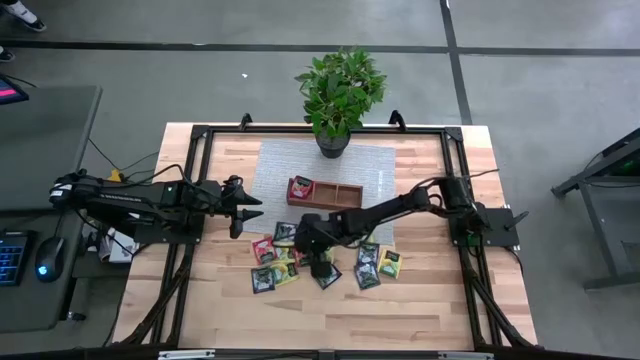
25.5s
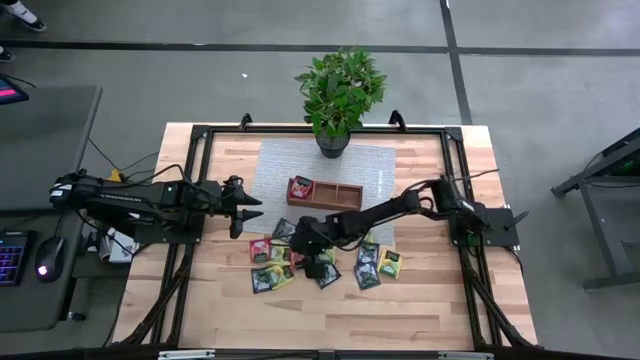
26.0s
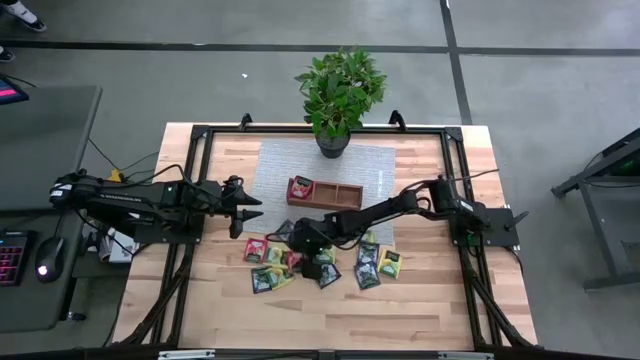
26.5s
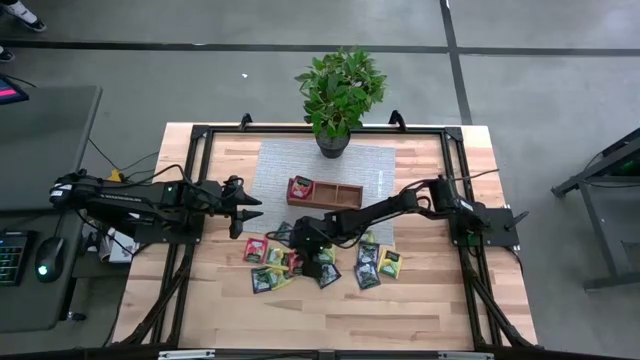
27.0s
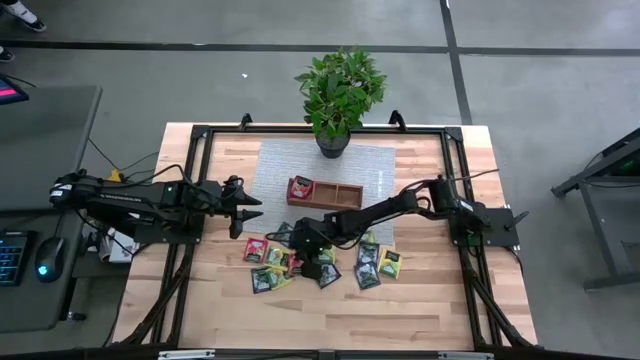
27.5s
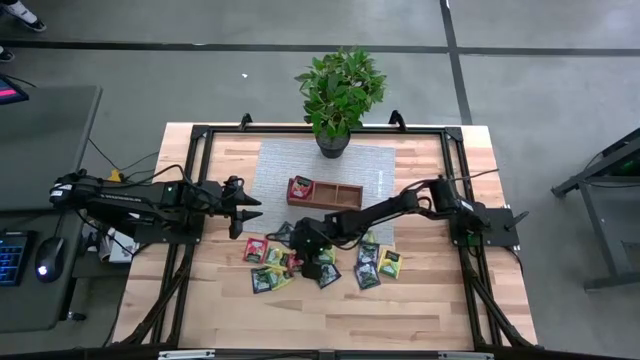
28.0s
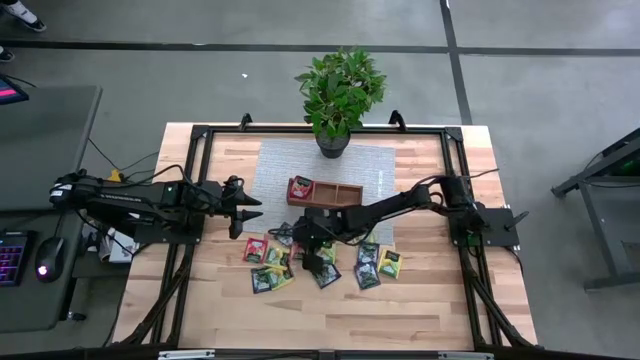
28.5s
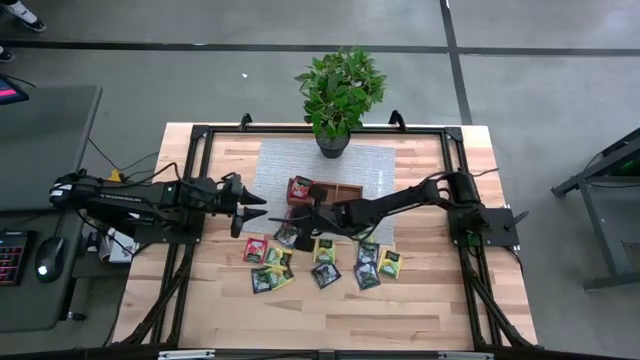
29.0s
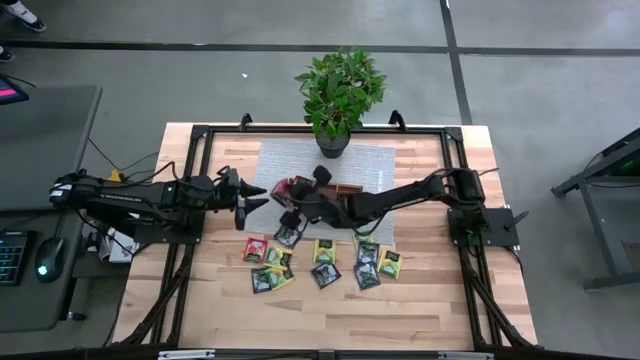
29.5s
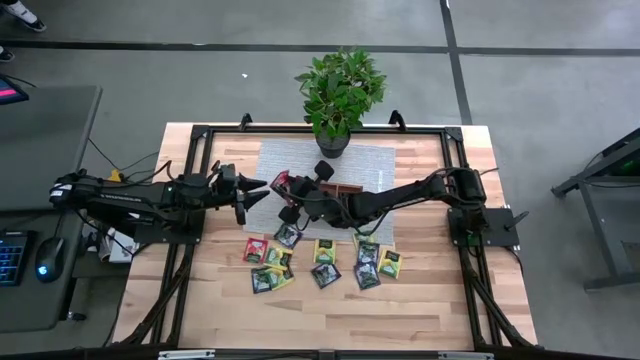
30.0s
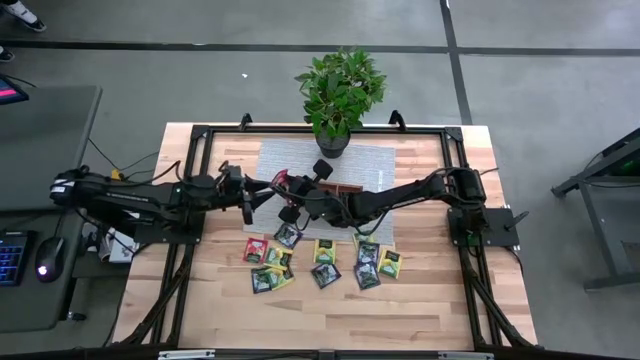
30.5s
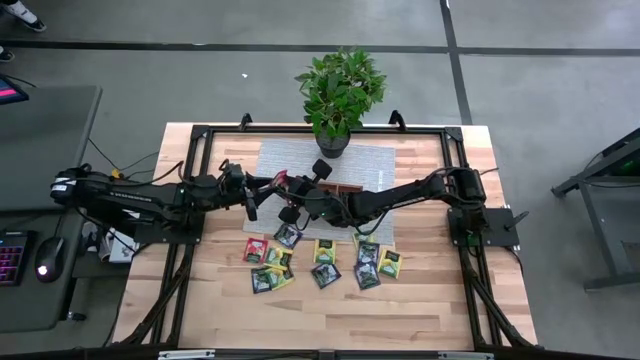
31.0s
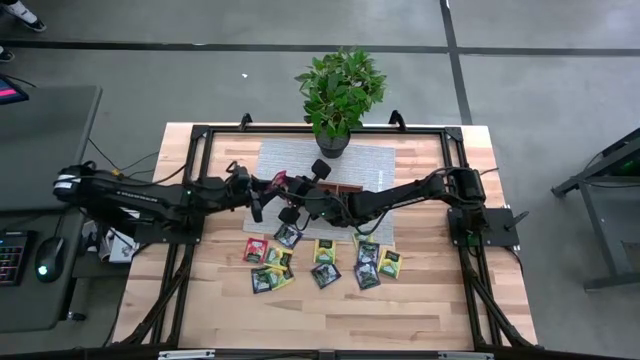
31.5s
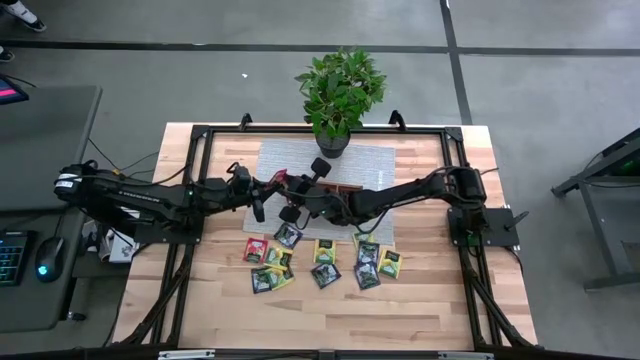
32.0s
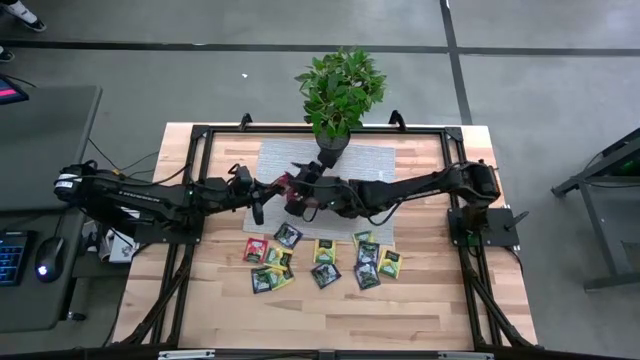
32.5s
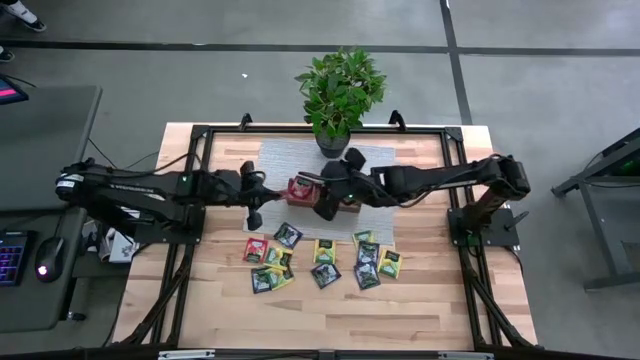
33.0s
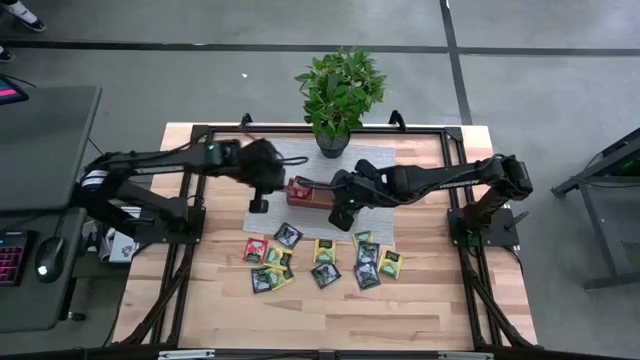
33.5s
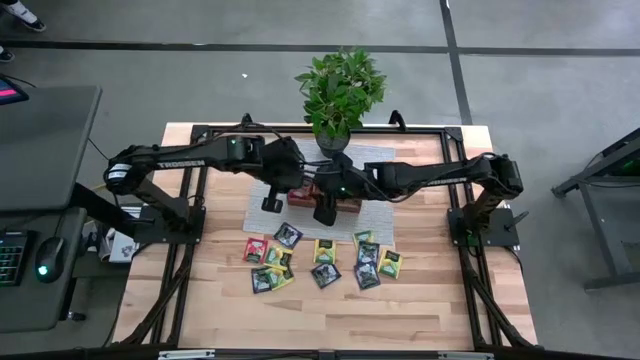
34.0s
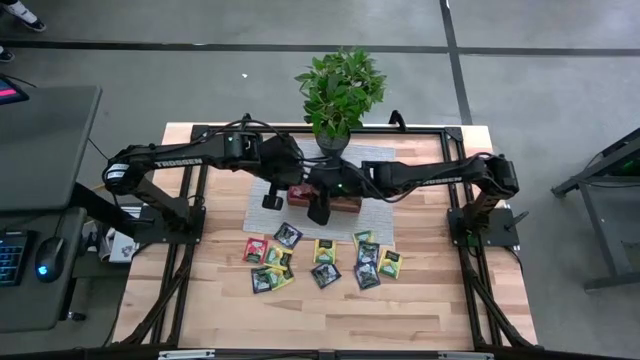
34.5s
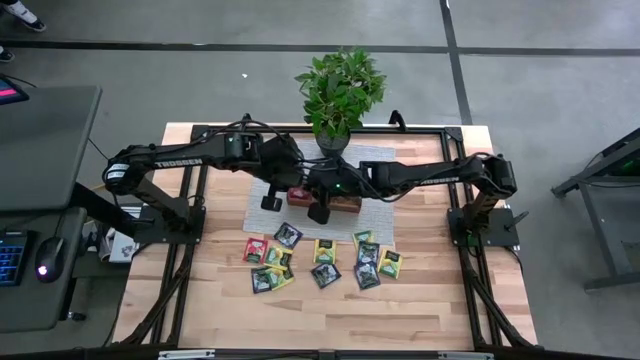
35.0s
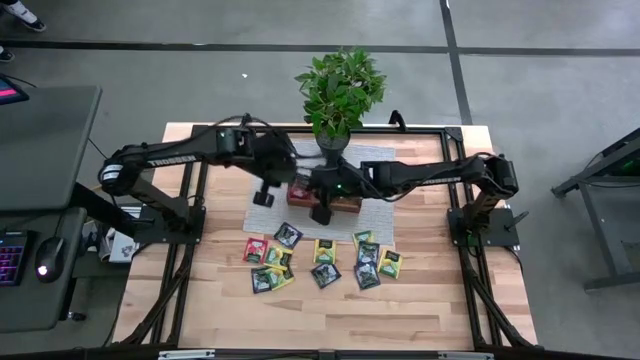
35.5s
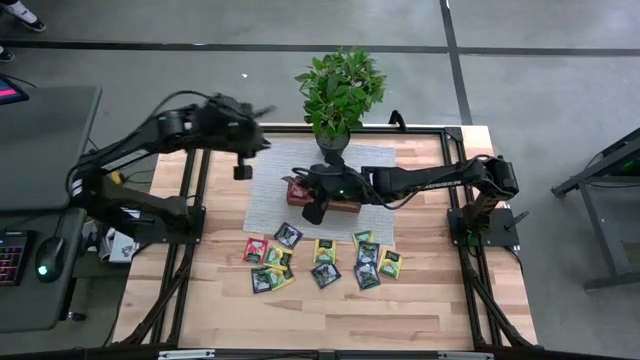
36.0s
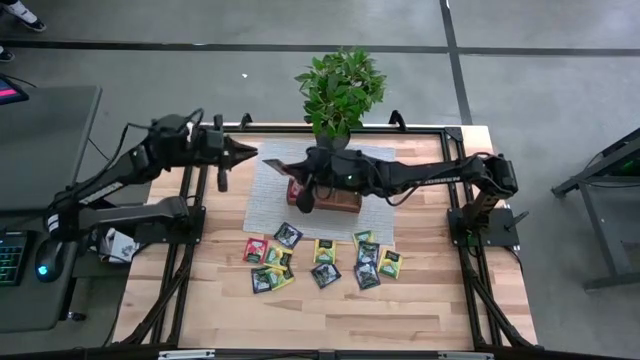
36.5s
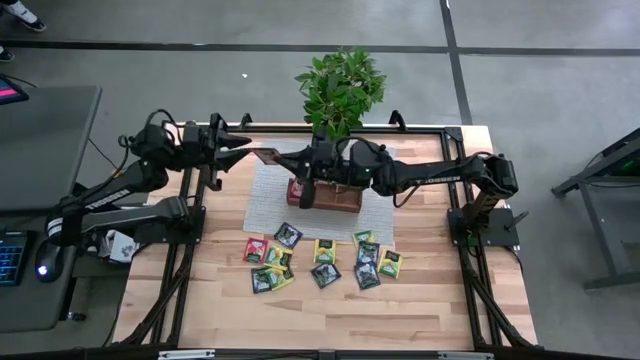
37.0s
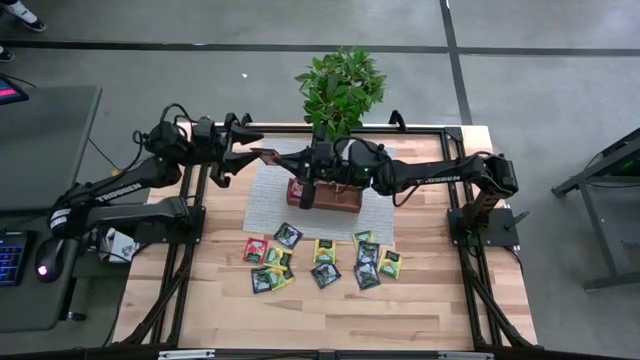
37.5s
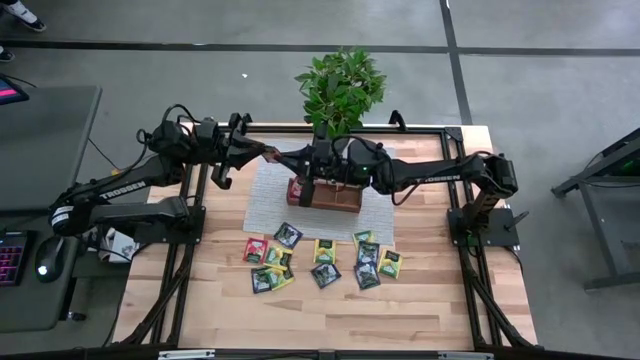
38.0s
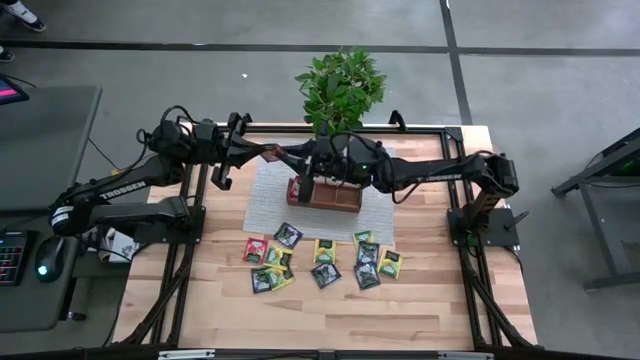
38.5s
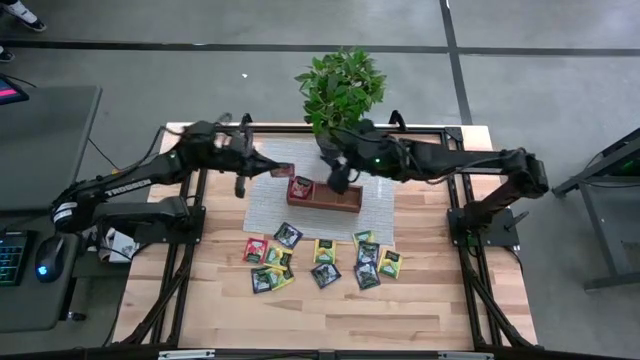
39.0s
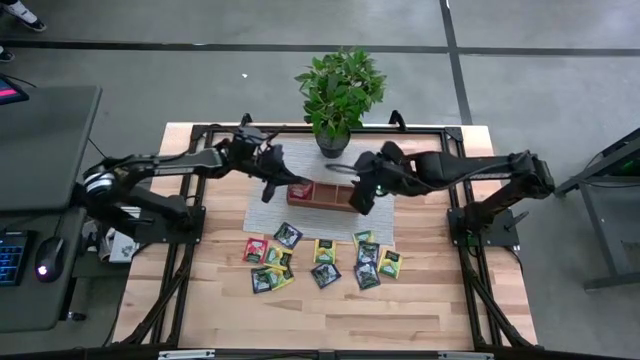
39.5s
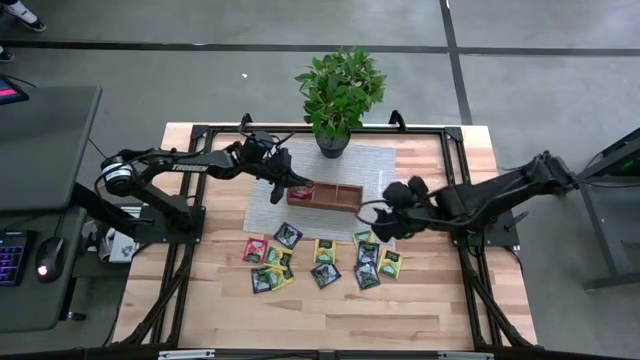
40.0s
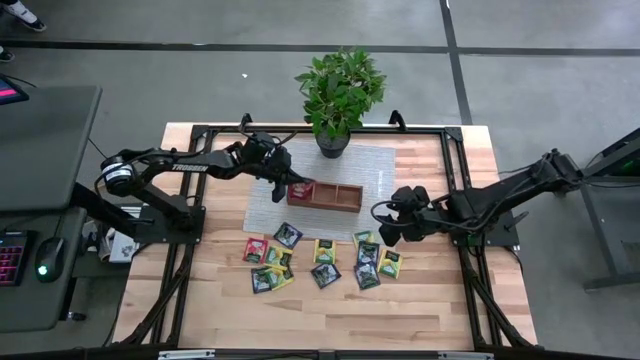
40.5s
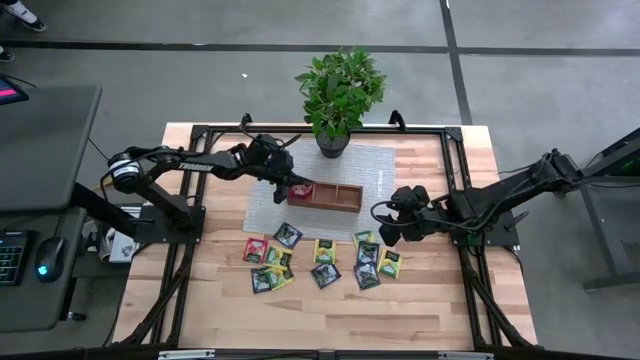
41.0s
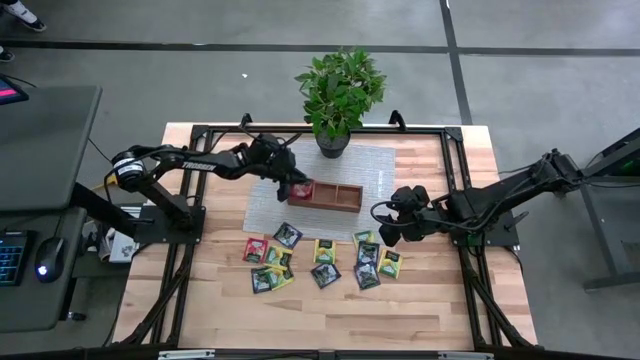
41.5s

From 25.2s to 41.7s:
Task: Pick & Place Tea
Put the red tea bag into the left section of the wooden organizer

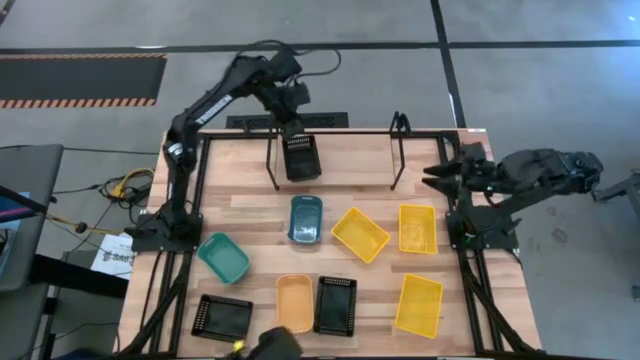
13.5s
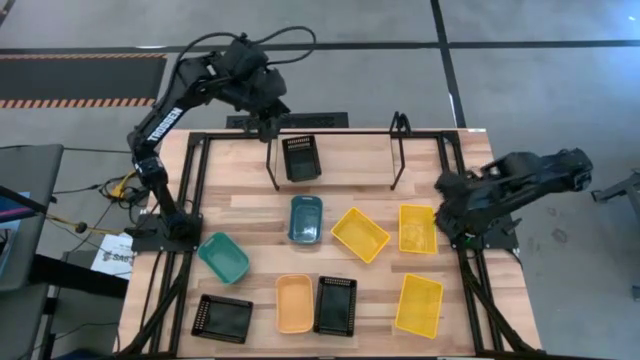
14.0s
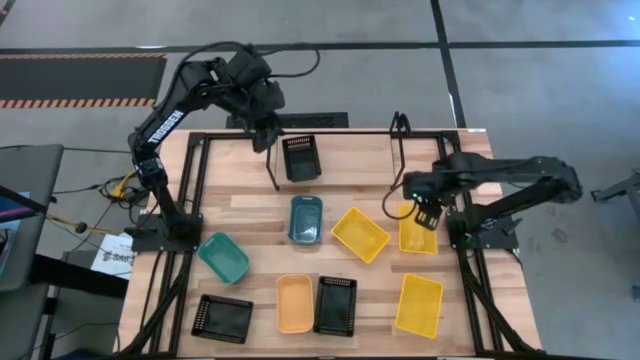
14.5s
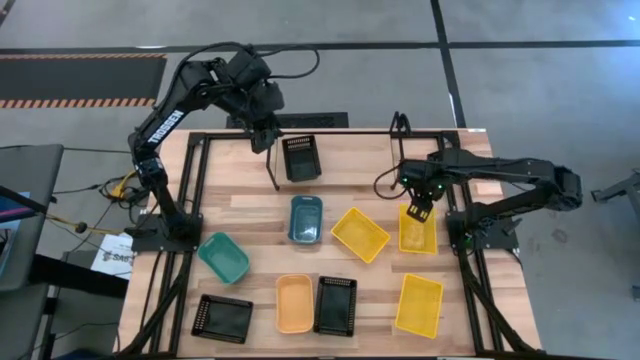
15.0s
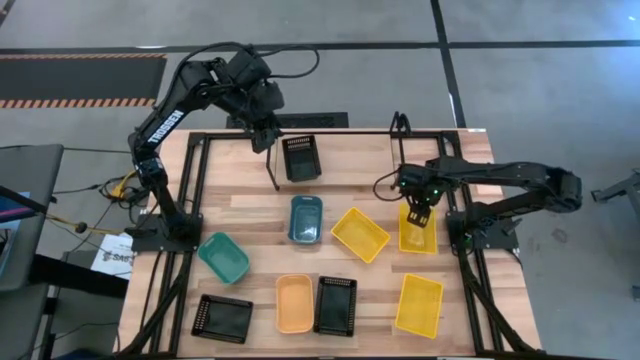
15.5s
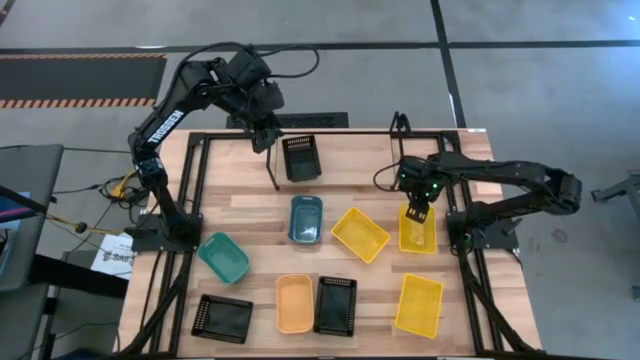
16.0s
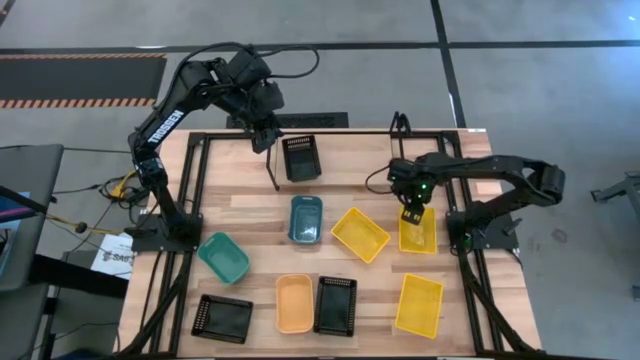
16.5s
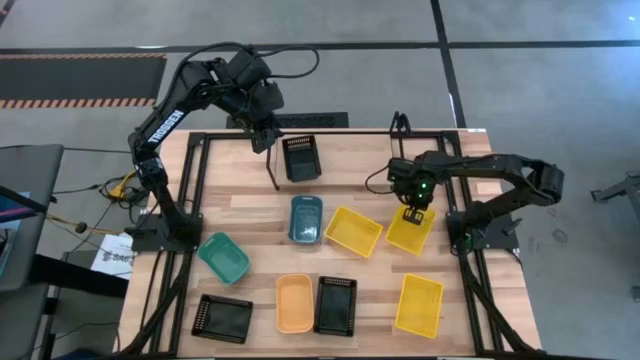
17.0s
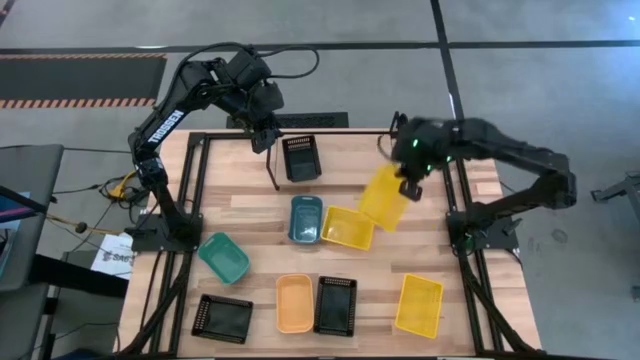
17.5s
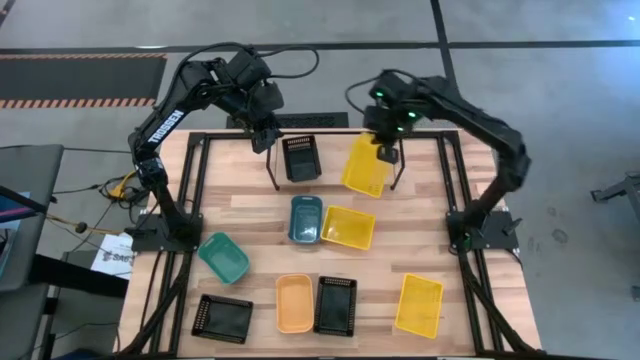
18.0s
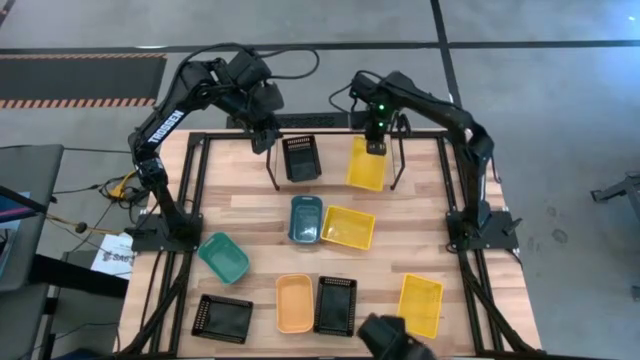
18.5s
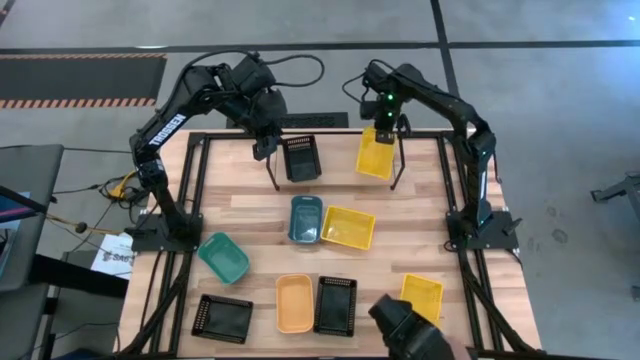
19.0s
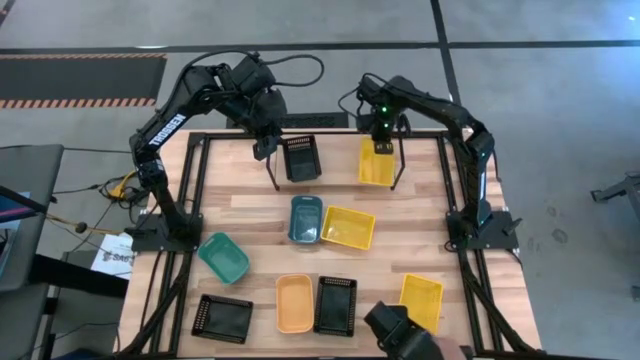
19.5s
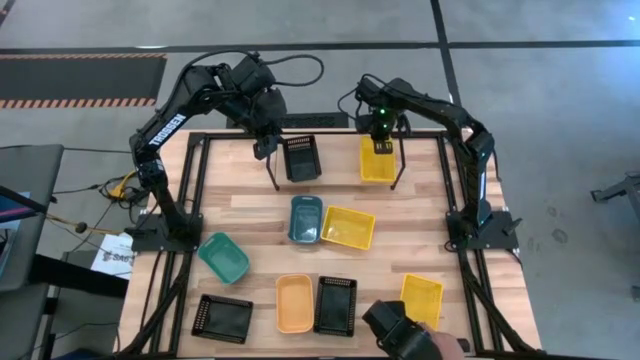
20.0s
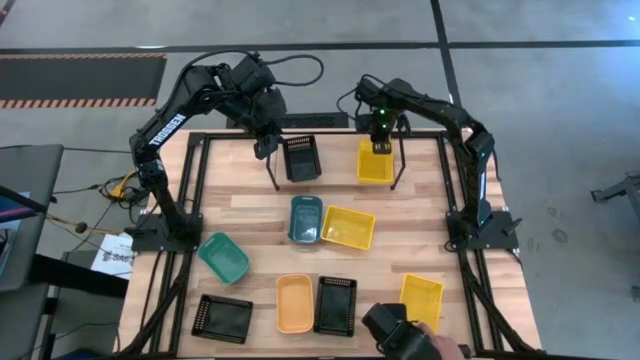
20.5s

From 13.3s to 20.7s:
Task: Stack baskets on shelf by color
Put the top right yellow bin on the shelf
